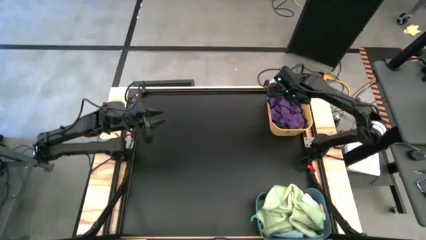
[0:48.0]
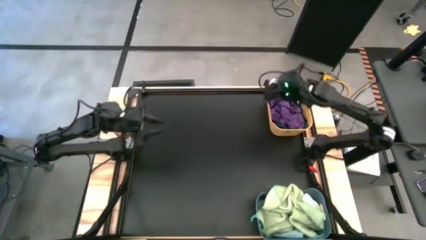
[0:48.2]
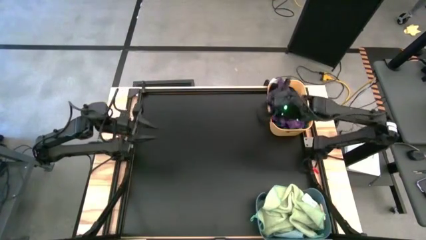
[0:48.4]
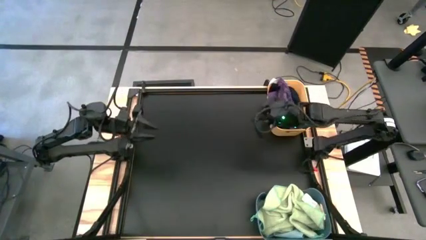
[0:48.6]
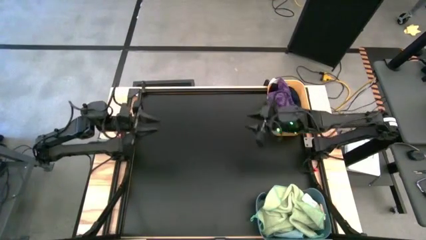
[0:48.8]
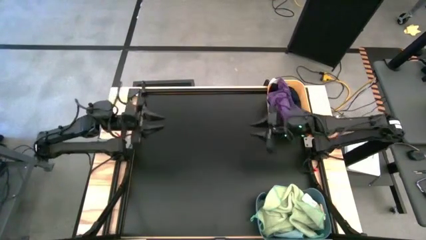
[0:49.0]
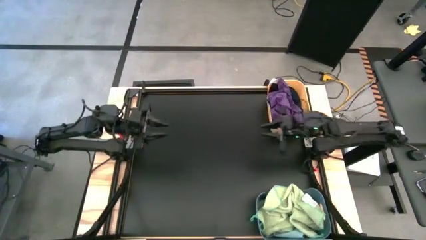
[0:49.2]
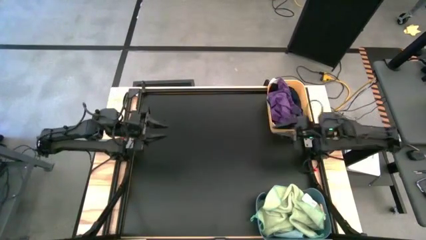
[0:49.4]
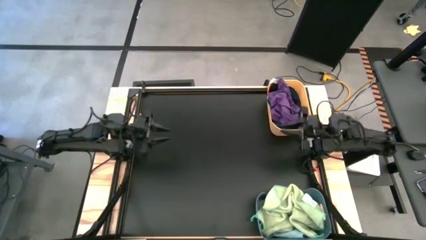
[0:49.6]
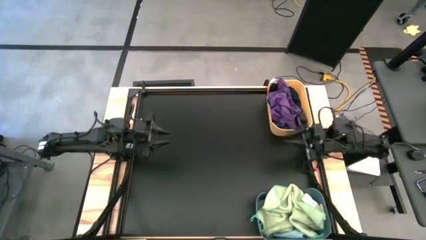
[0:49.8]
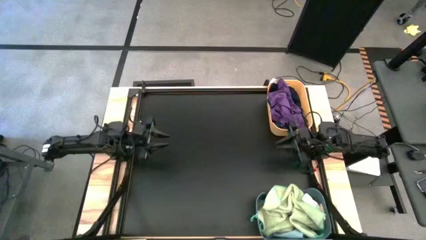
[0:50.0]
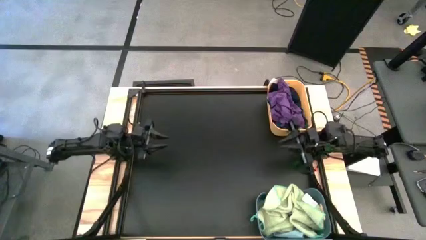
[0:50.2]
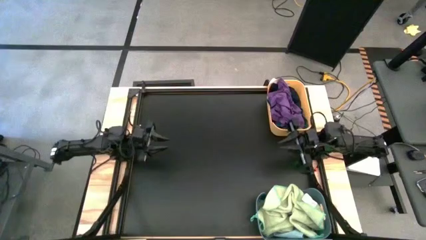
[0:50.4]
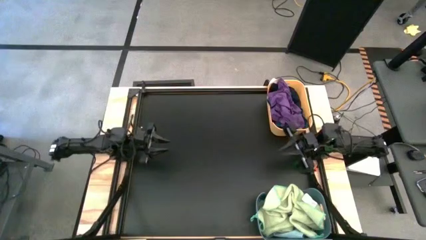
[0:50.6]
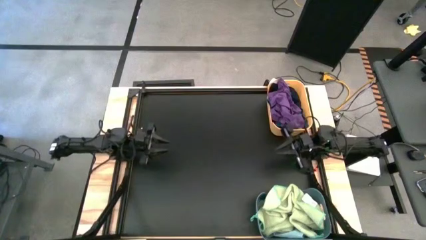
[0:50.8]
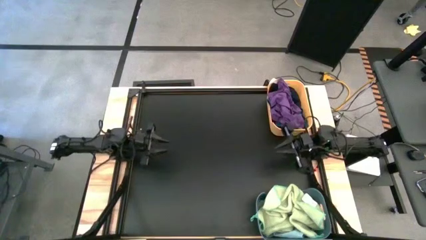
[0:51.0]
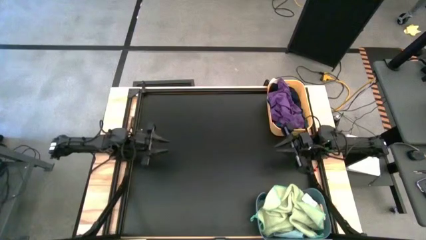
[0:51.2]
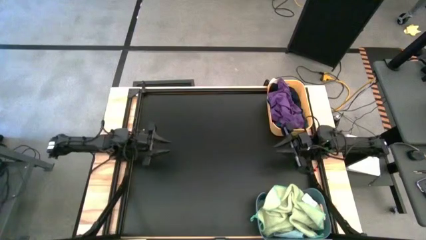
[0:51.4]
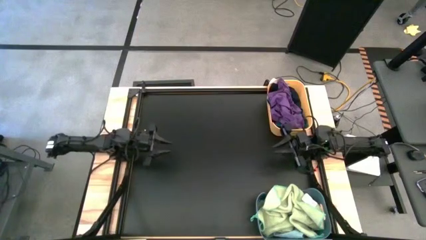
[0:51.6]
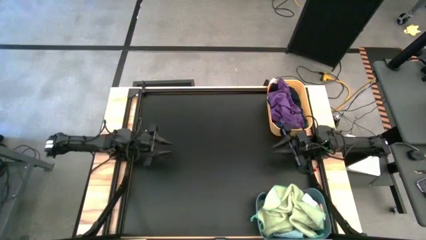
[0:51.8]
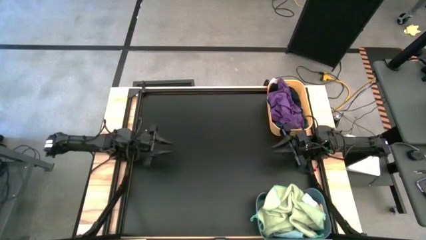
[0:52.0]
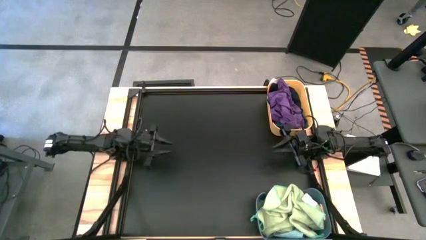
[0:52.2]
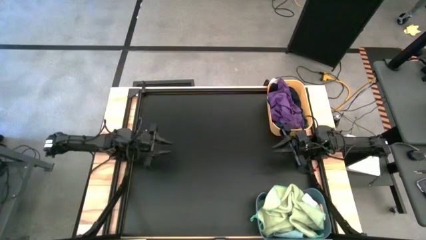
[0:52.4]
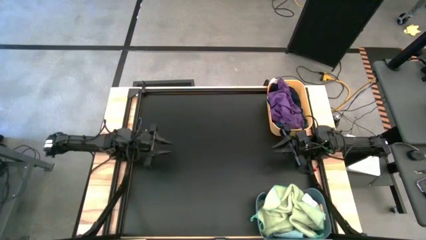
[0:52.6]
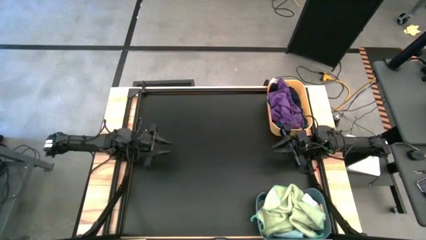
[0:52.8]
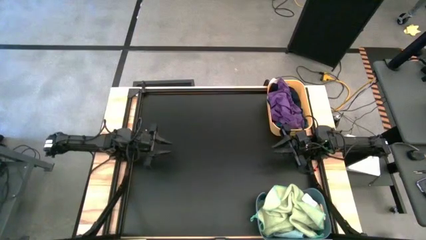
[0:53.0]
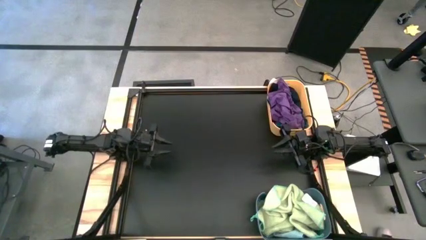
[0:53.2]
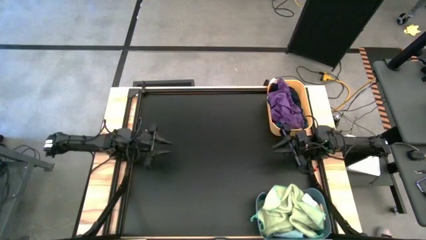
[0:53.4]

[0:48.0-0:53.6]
Task: Sort towels by color in basket
Return to Home Position

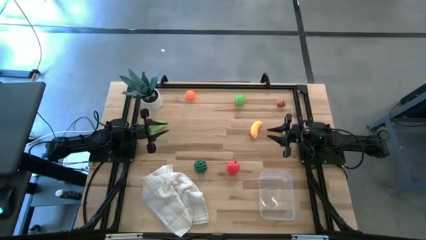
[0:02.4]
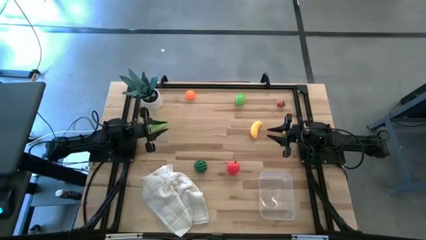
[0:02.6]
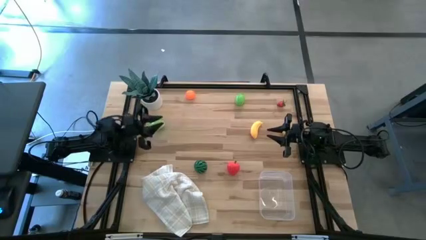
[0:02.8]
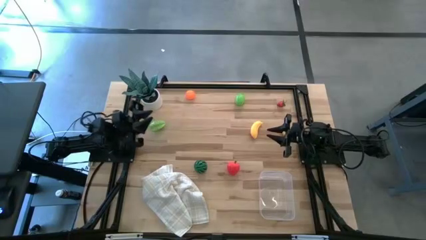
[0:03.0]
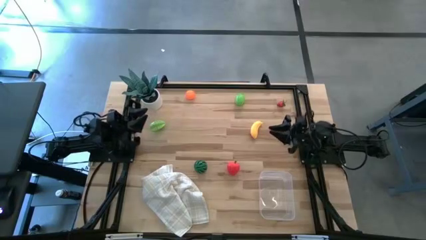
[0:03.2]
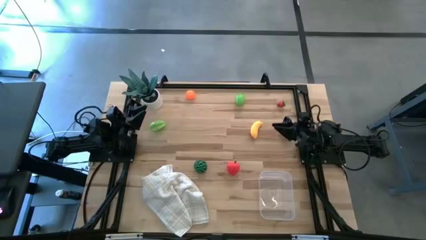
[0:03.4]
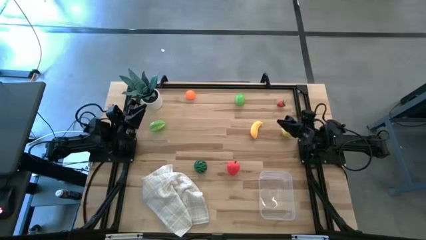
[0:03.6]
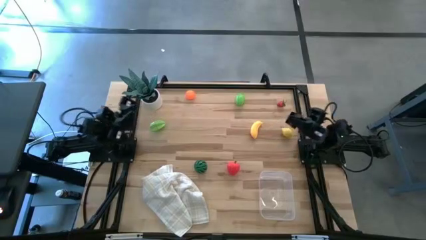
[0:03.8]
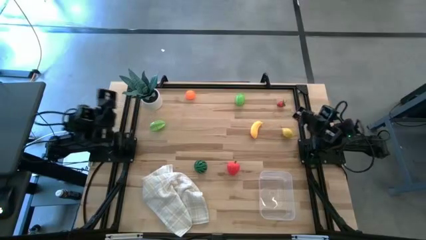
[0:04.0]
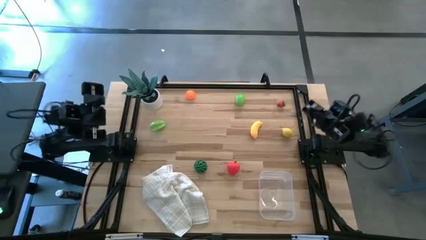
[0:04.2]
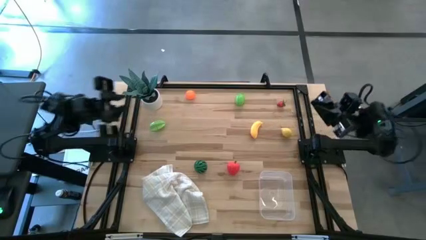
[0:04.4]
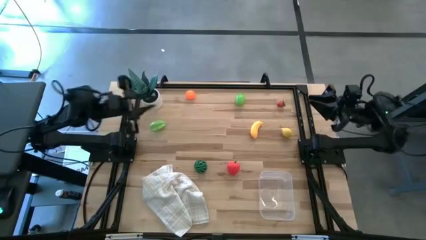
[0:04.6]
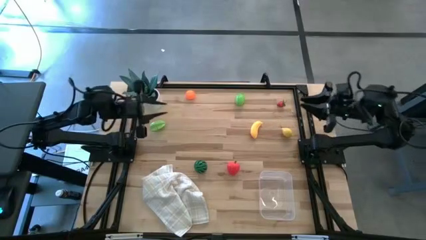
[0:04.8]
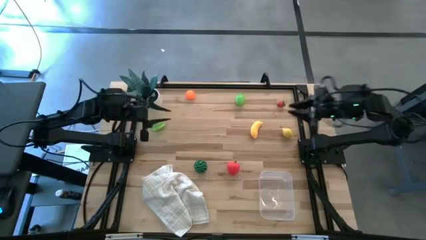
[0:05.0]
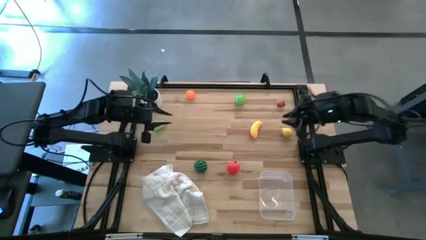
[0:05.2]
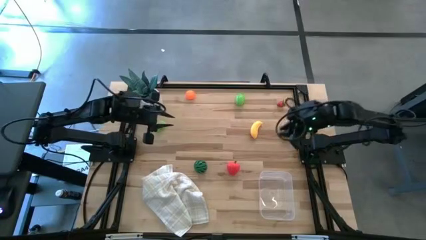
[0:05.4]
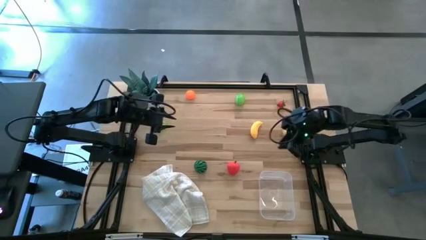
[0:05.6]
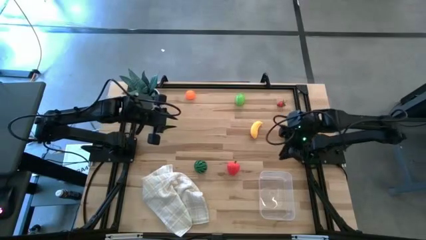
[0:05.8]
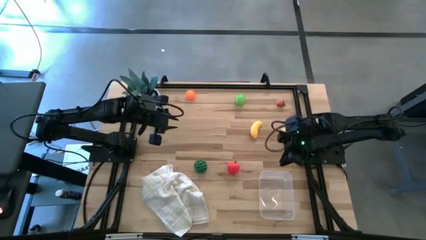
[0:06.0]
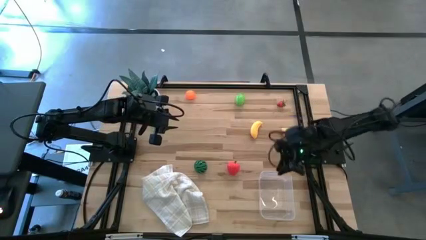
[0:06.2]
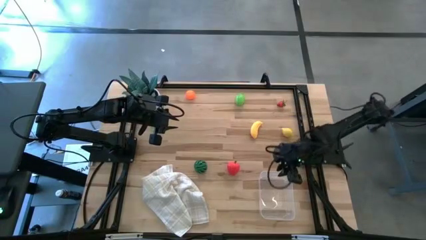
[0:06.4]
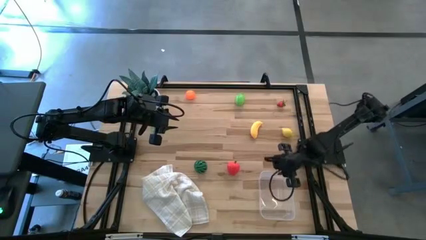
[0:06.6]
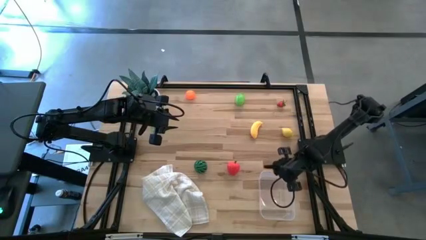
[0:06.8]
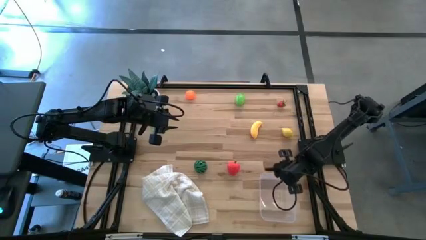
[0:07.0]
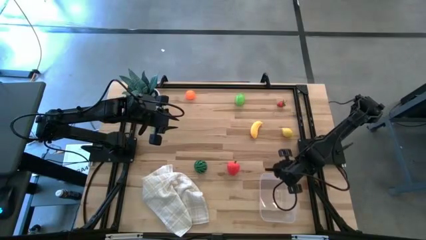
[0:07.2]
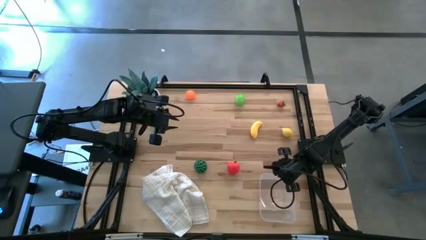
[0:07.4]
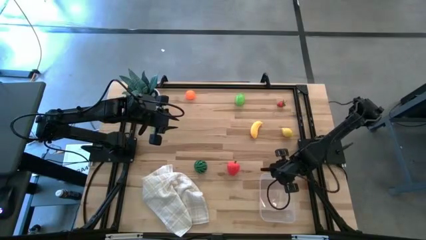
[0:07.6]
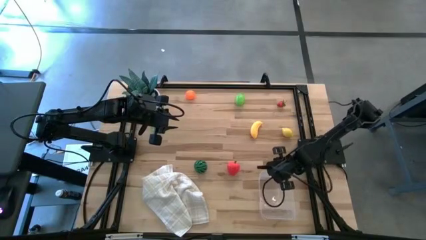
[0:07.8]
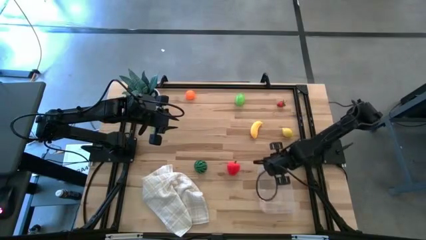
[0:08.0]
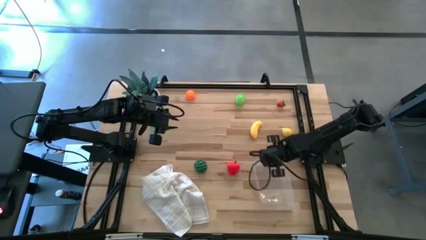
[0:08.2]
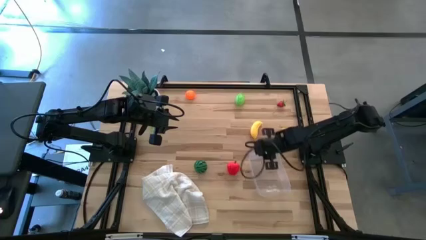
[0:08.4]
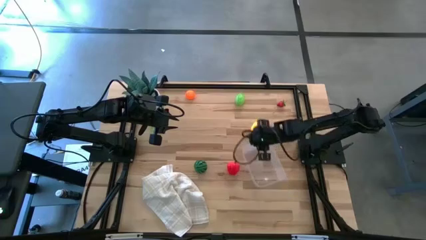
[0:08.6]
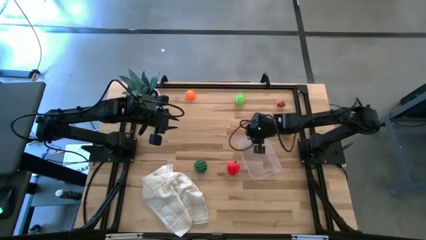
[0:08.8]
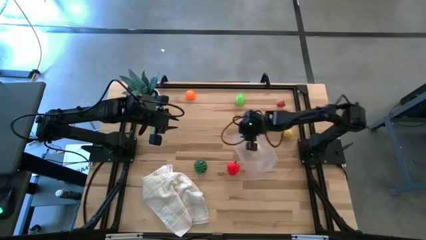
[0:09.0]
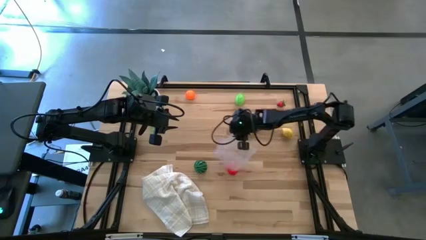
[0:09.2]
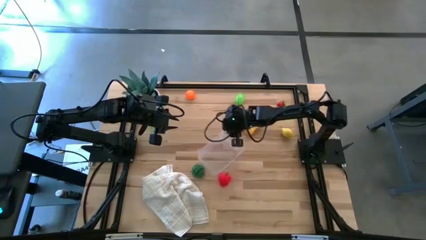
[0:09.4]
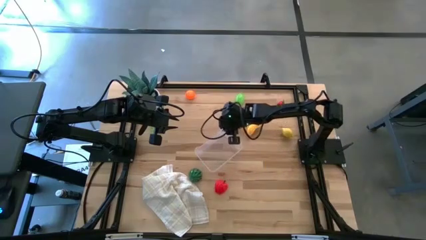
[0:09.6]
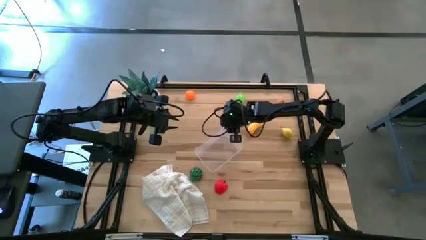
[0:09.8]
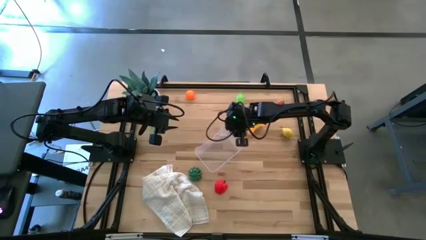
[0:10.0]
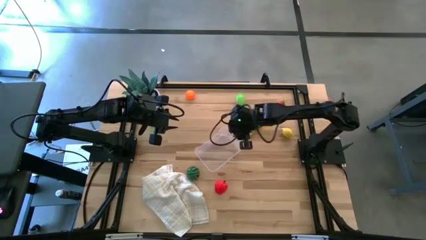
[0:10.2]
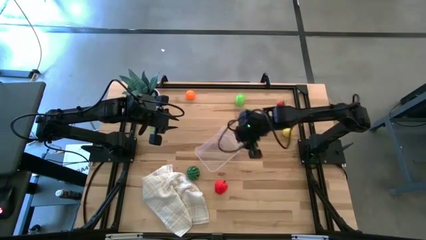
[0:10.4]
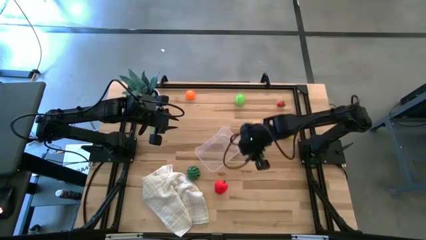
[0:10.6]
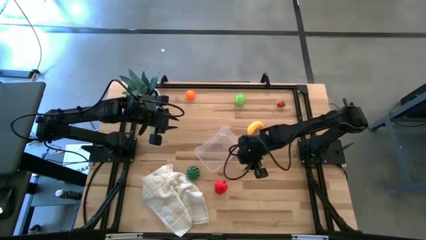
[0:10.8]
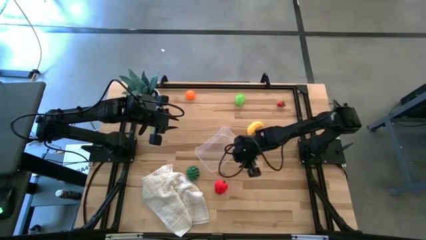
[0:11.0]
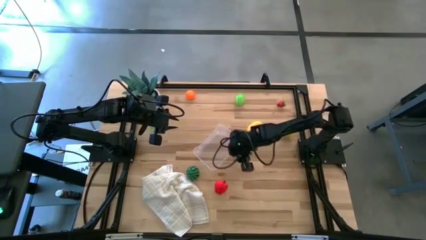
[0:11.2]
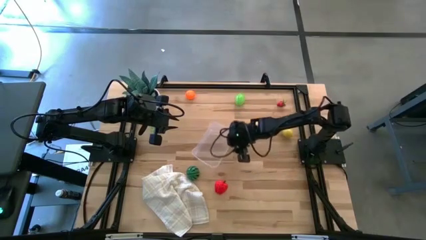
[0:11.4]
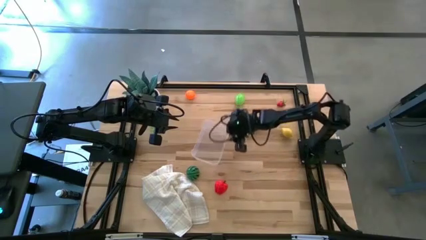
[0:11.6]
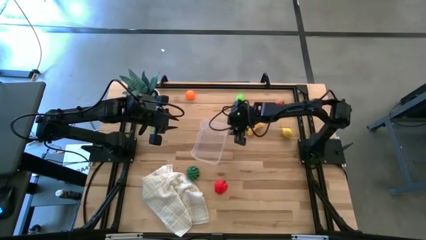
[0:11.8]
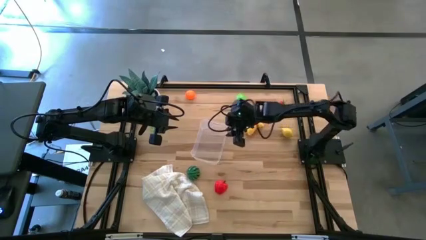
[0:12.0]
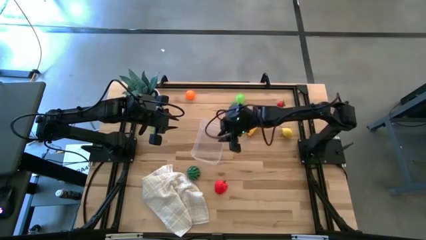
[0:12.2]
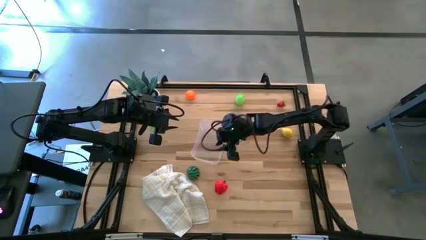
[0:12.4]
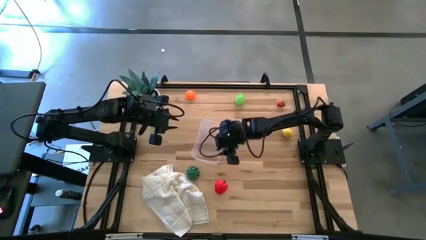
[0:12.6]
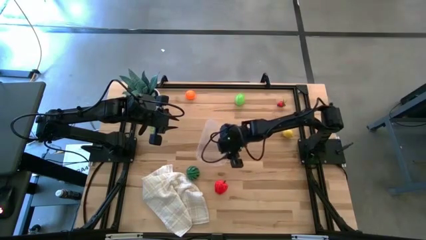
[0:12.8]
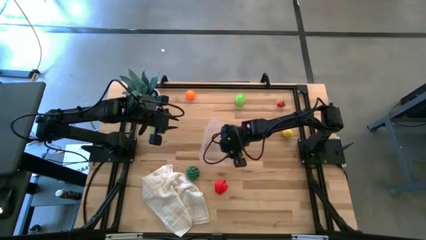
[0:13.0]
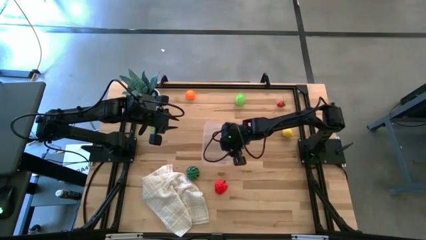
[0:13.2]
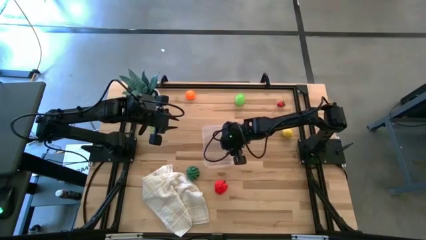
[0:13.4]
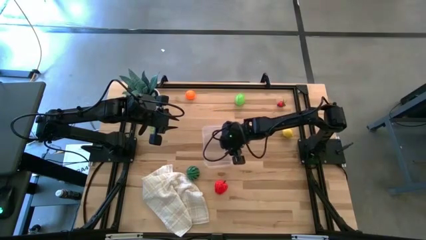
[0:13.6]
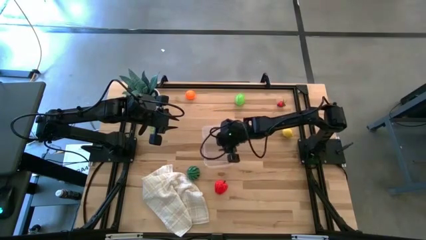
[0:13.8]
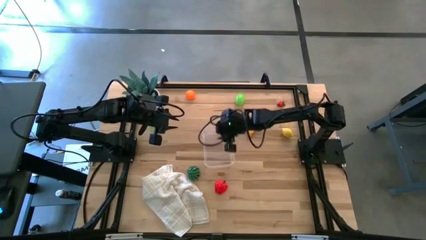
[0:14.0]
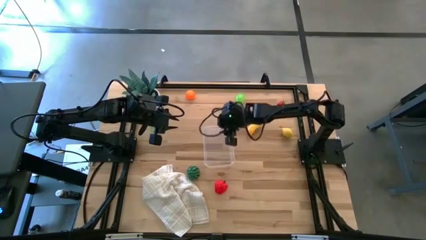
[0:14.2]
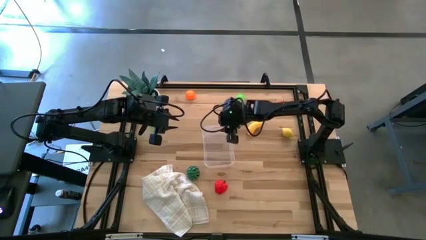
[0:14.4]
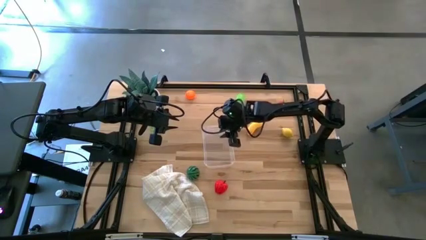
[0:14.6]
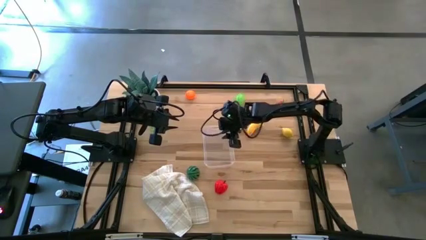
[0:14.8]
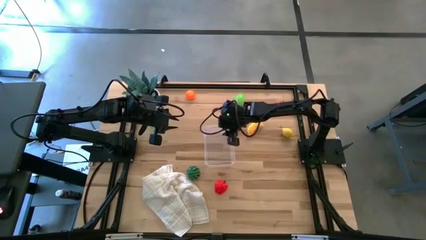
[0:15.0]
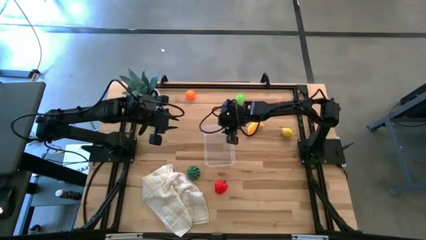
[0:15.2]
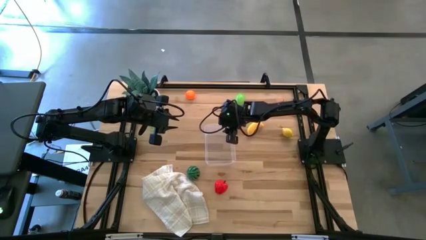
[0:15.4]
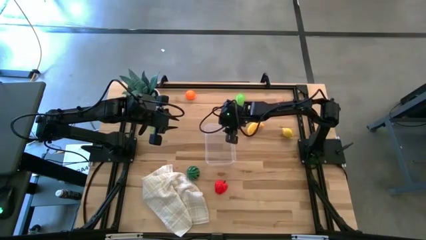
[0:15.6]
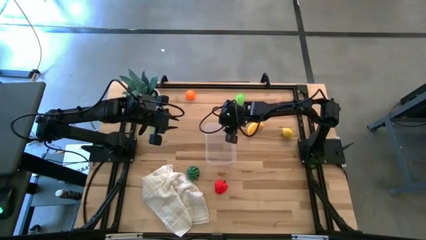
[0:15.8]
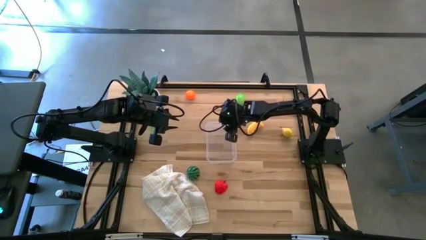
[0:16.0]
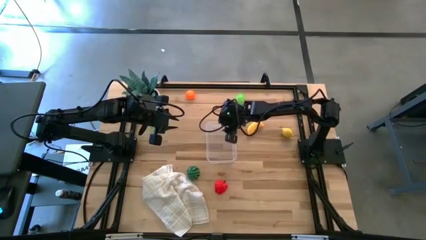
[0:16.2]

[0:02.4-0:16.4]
Task: Pick and placing Produce into tupperware
Move the transparent bin to the center of the table
